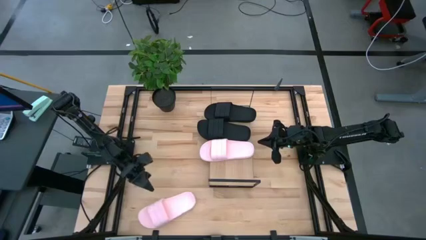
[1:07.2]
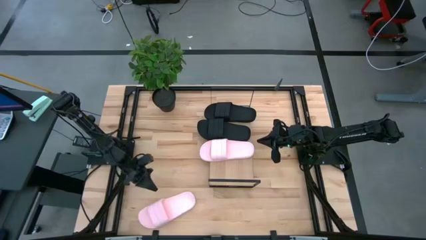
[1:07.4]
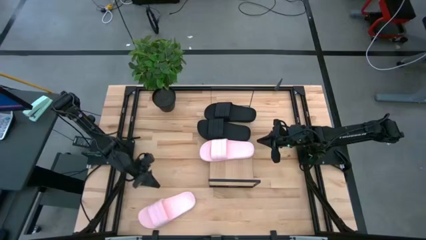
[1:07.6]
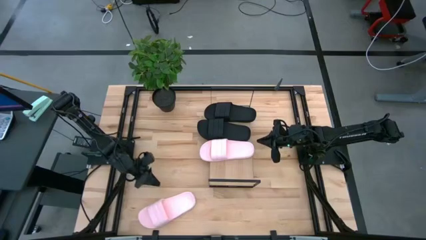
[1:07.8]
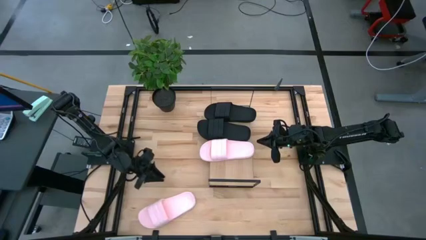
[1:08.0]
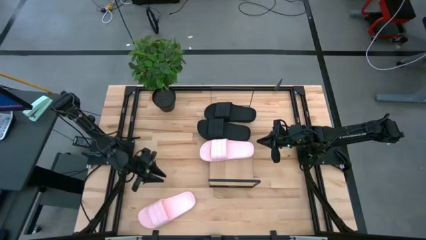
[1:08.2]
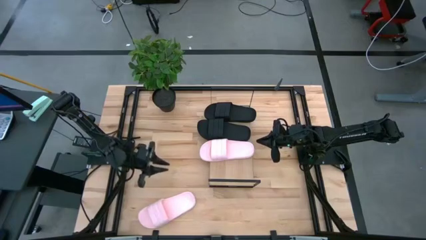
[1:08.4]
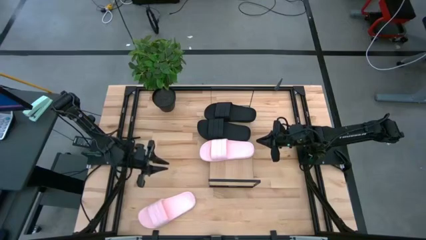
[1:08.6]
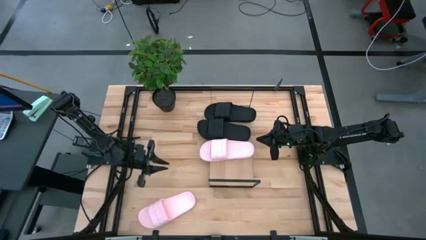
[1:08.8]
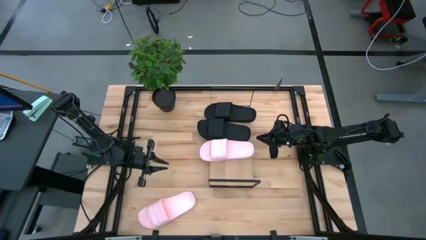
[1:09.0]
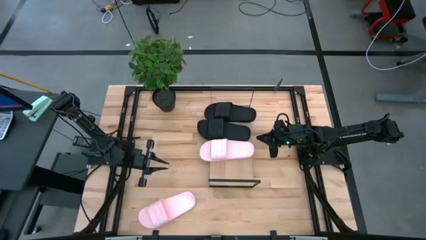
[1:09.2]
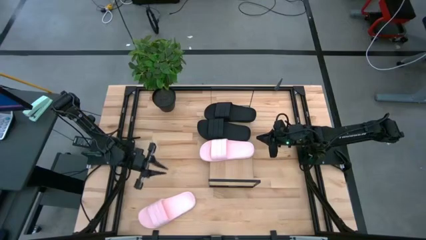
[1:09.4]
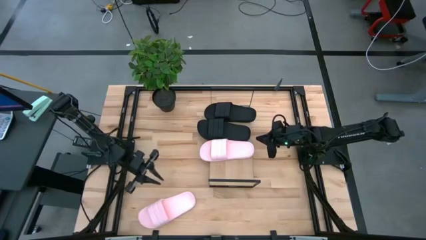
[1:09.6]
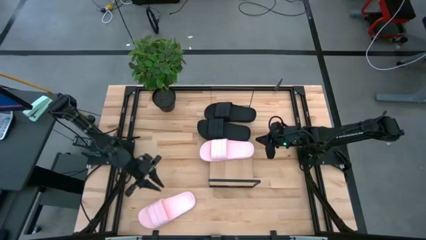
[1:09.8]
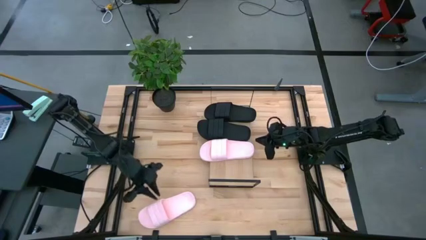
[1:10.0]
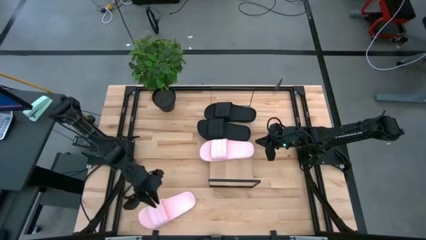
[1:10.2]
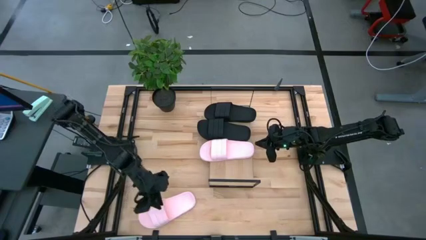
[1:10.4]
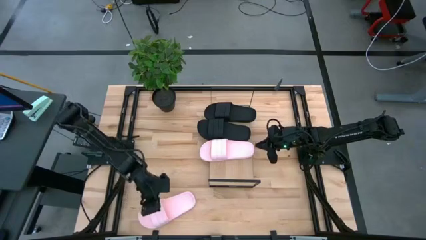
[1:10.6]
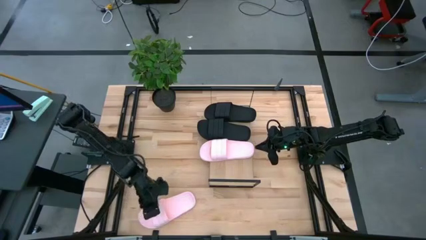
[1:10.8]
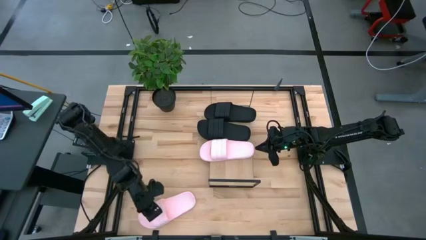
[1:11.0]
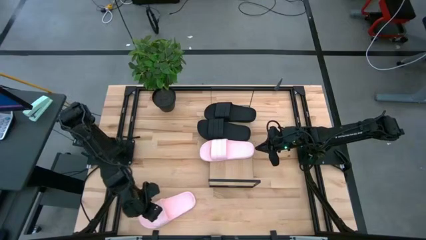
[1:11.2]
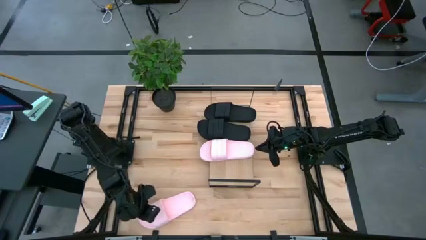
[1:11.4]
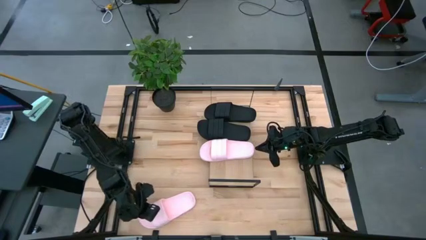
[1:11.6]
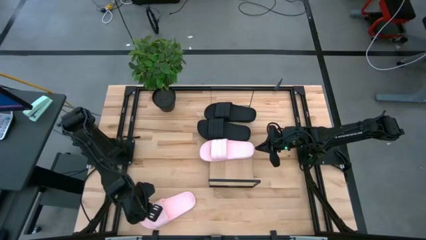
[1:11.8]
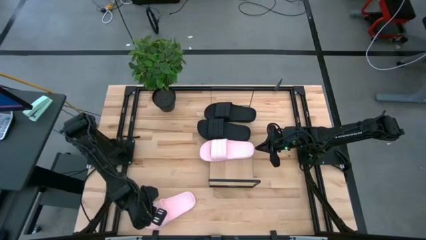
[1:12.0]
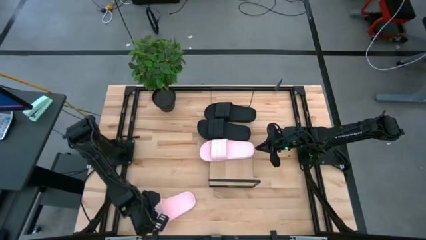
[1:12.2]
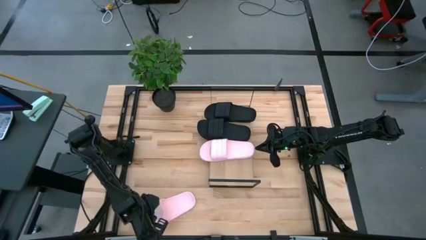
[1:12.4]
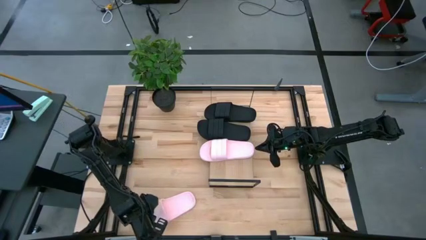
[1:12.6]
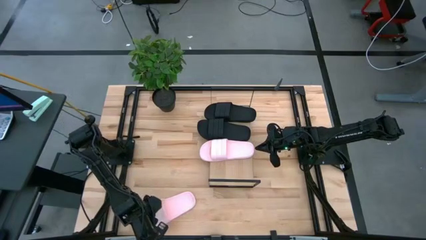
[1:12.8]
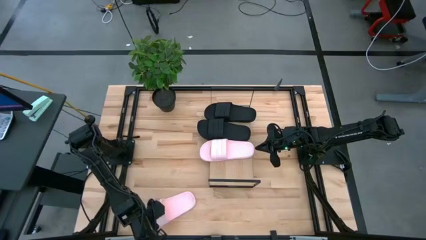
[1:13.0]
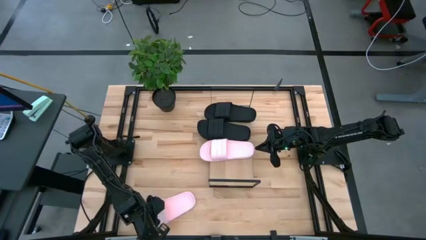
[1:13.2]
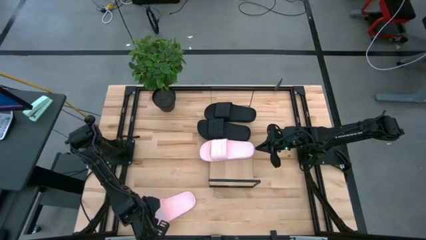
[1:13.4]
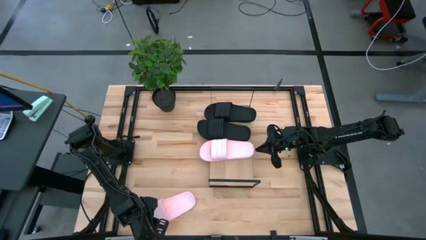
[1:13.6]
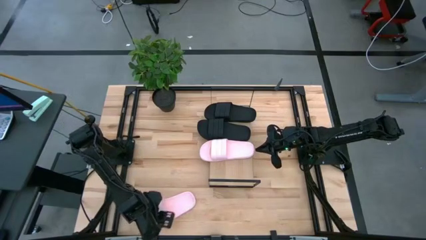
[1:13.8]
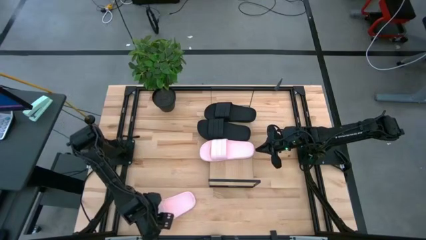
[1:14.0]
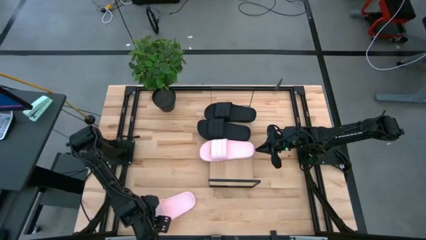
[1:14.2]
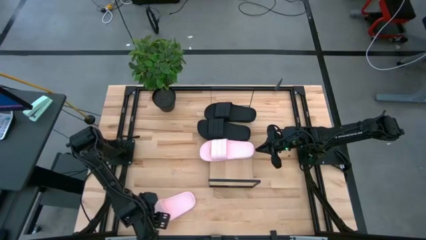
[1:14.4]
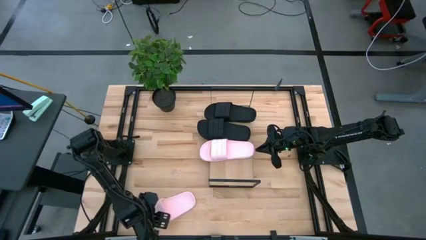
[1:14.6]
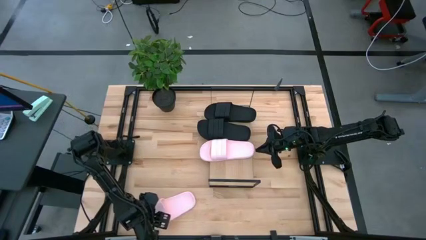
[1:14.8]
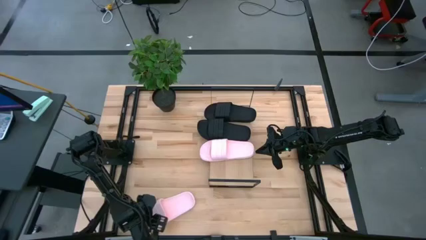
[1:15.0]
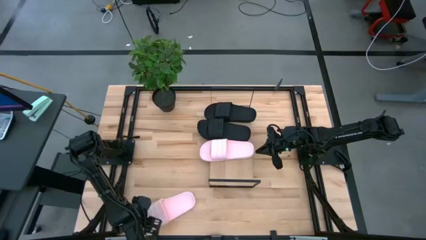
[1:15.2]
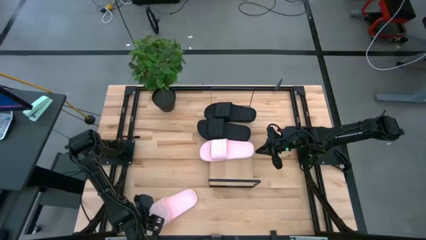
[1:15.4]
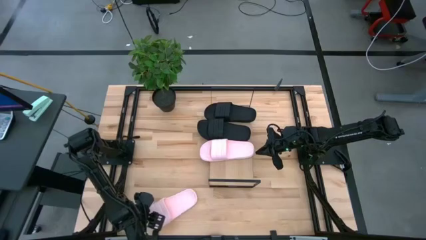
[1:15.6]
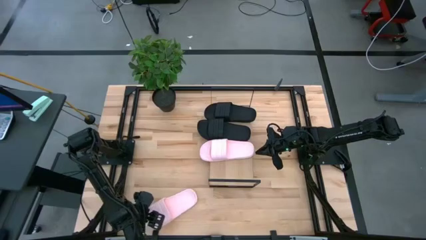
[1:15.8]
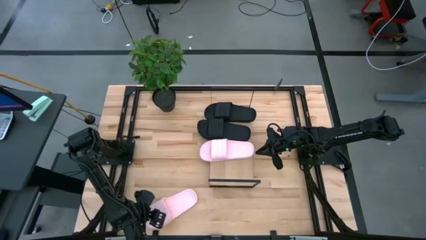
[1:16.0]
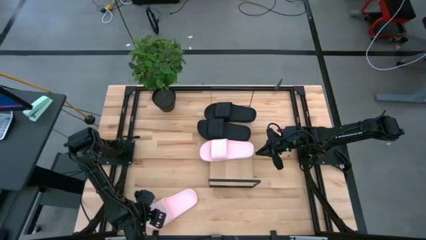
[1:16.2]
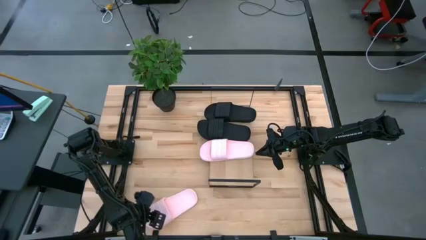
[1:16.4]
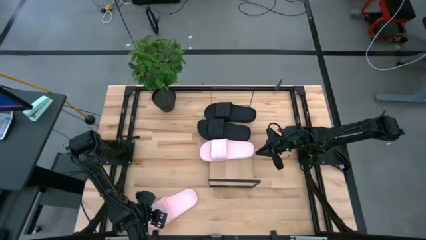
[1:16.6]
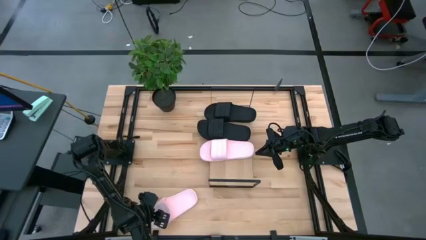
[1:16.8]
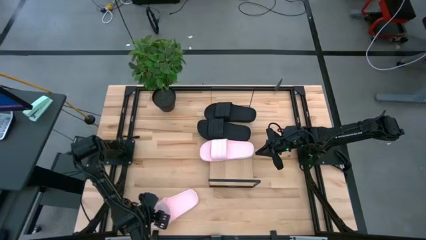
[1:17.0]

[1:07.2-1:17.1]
Task: Pick and place slides into the shelf
Put the pink slides on the shelf

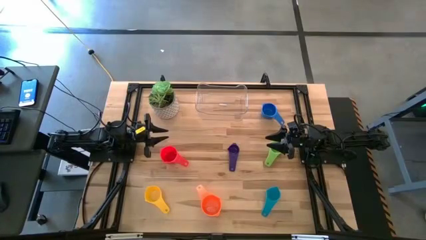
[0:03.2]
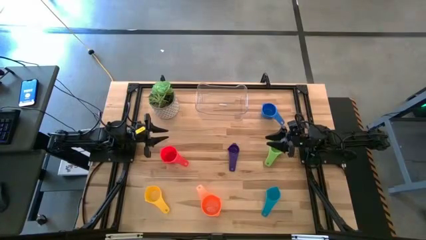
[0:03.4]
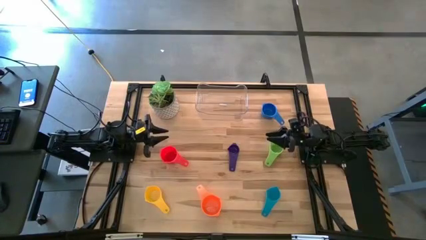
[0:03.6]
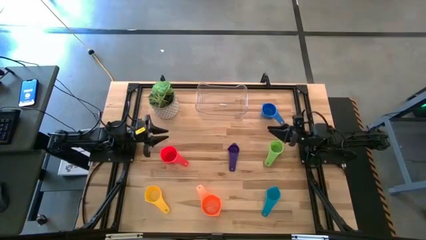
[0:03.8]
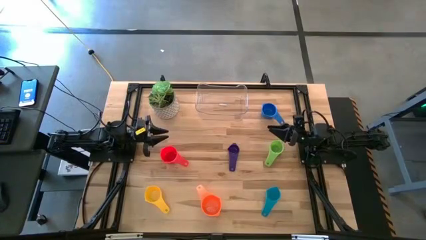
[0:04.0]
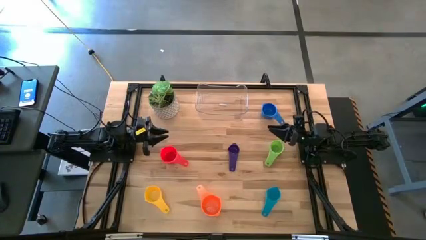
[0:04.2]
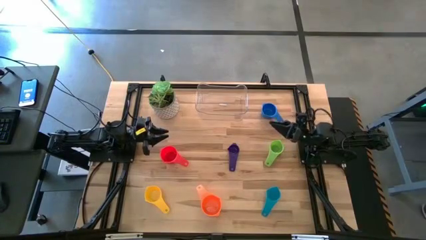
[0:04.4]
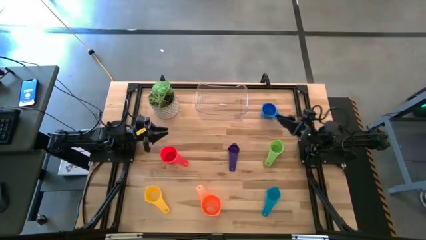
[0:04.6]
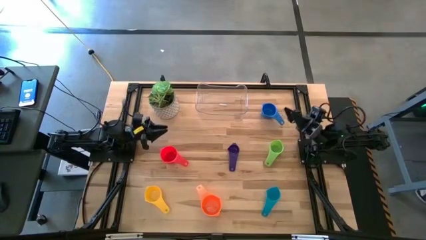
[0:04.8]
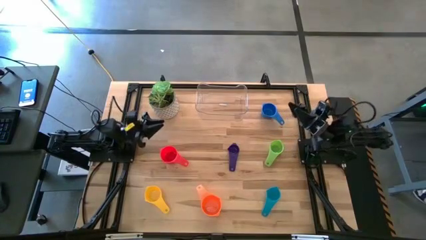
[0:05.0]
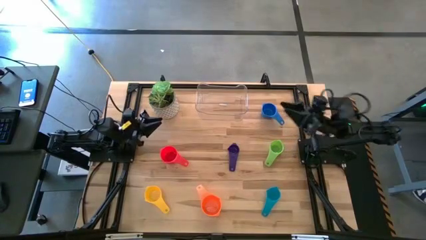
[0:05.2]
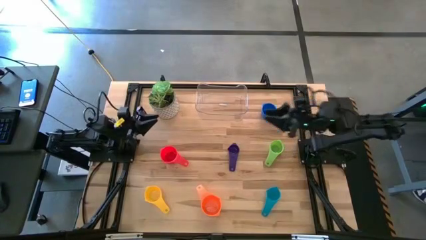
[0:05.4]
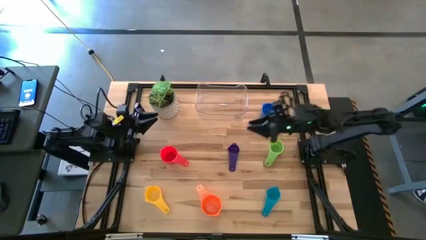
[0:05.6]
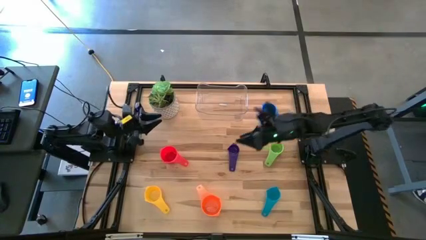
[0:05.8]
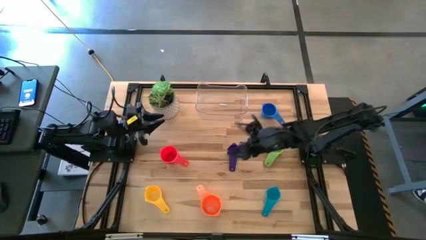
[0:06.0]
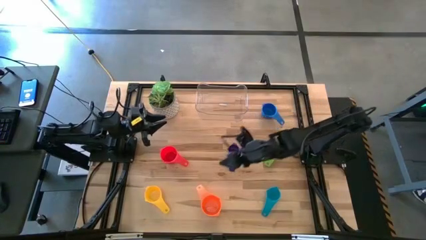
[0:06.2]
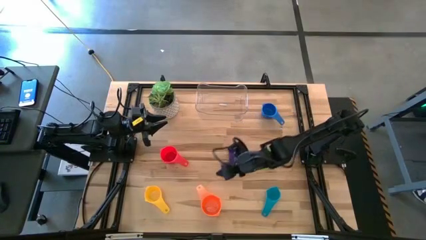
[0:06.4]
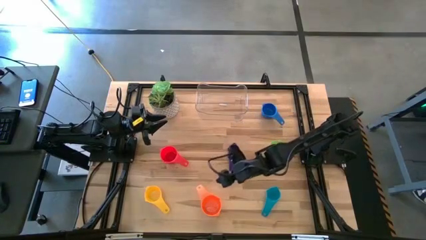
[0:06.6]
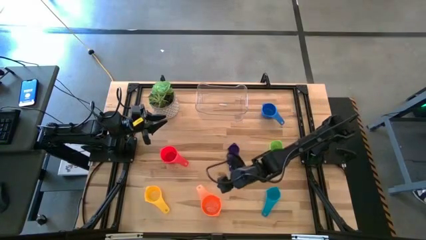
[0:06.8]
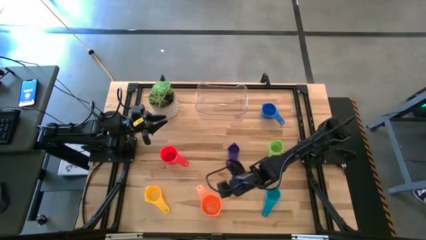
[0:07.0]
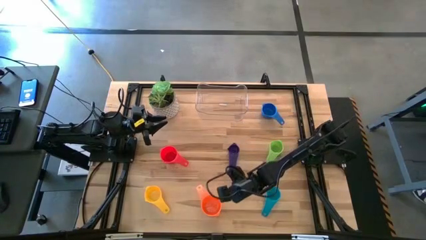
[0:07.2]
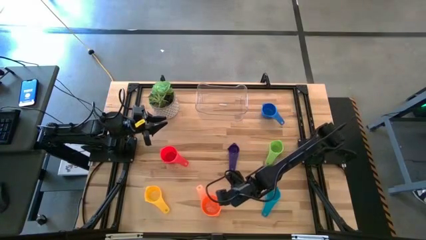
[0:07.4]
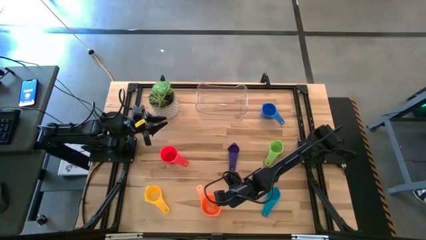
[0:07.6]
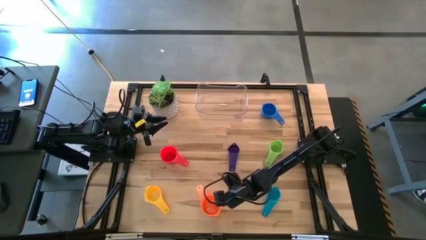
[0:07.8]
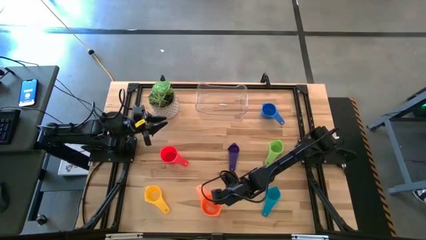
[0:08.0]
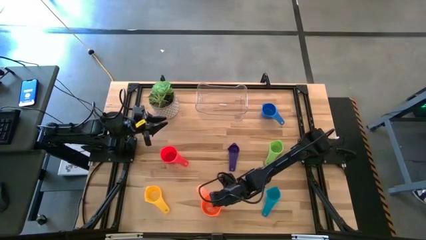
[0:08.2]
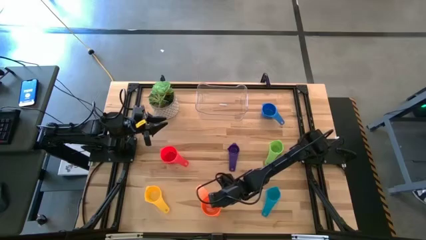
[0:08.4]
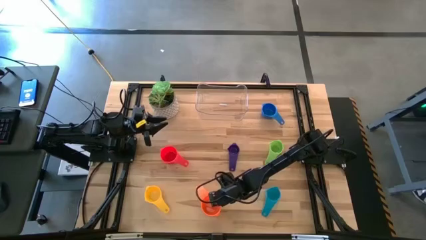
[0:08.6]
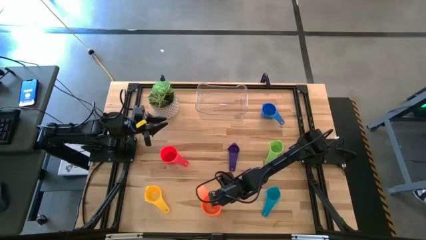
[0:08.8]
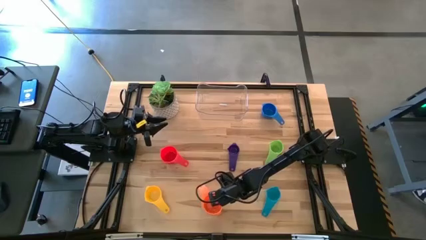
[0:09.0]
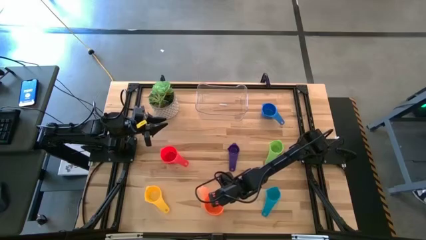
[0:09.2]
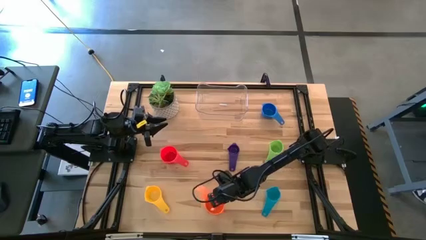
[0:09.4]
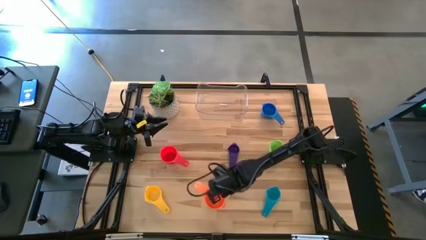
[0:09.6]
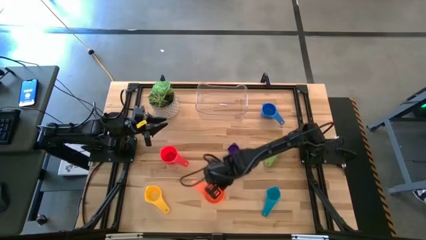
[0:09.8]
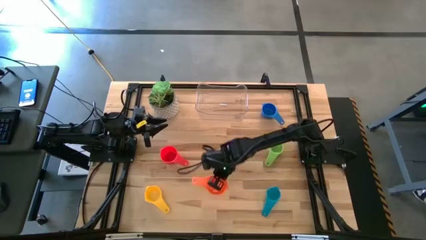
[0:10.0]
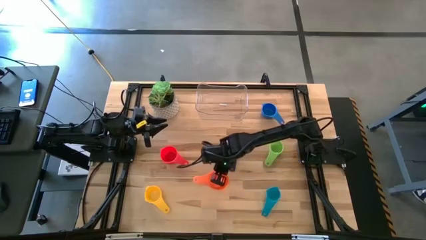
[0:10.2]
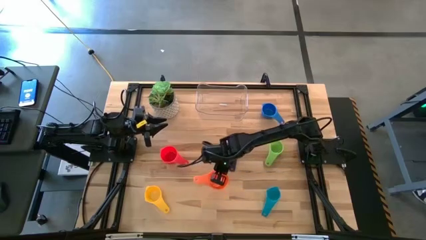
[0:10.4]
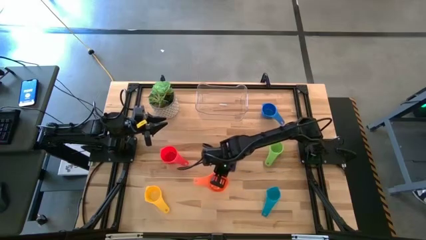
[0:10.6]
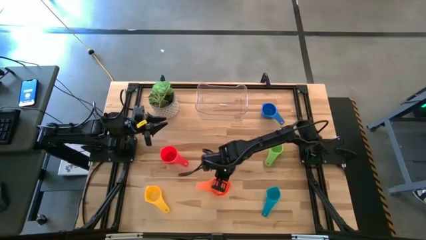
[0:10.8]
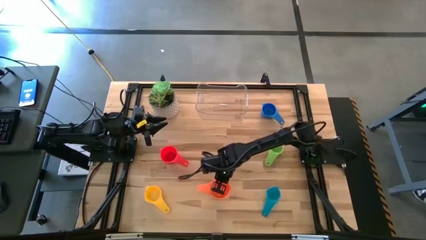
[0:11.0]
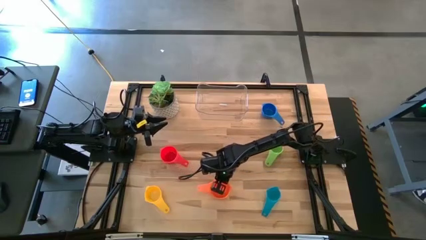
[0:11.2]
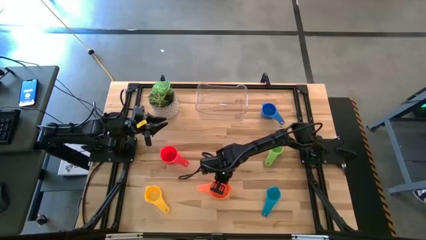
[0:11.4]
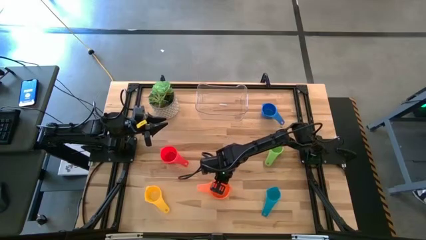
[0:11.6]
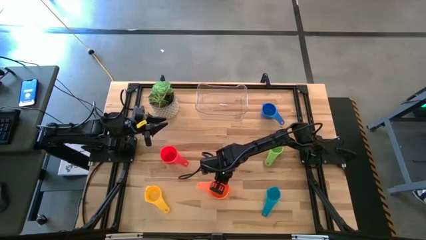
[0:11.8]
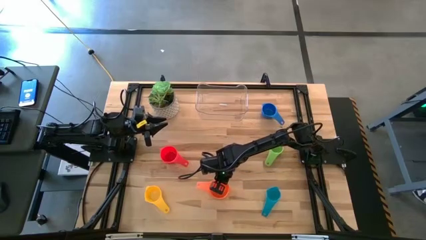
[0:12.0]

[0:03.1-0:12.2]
Task: Nest measuring cups in basket
Move the orange measuring cup to middle of the table
